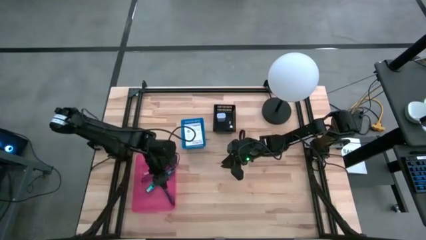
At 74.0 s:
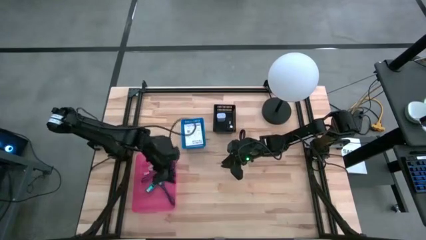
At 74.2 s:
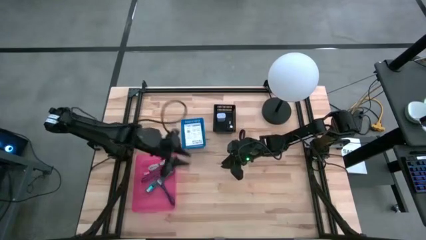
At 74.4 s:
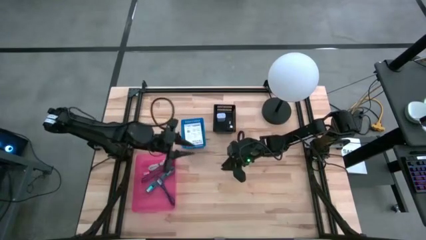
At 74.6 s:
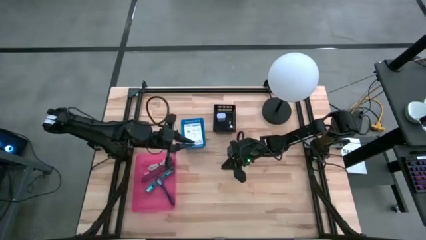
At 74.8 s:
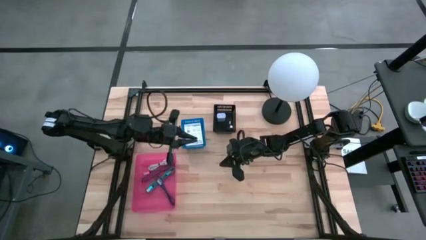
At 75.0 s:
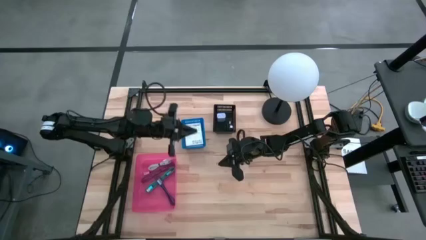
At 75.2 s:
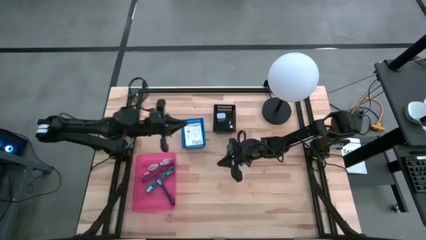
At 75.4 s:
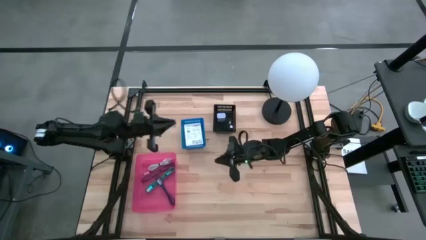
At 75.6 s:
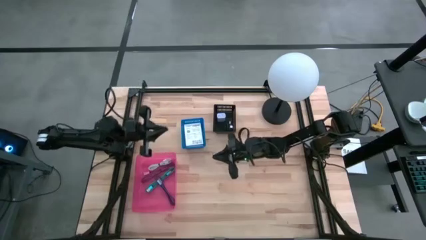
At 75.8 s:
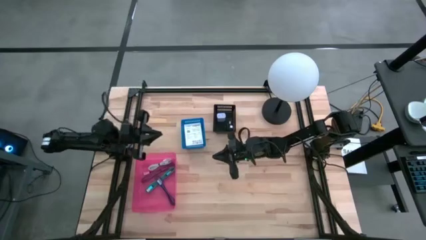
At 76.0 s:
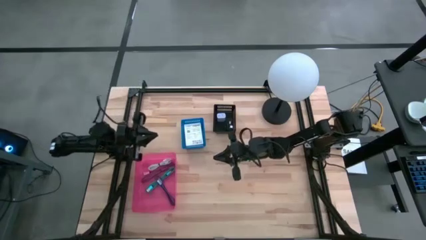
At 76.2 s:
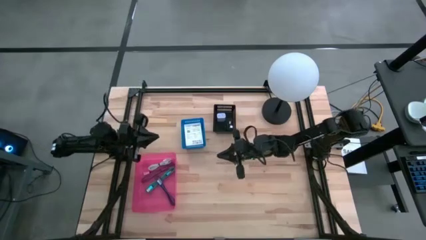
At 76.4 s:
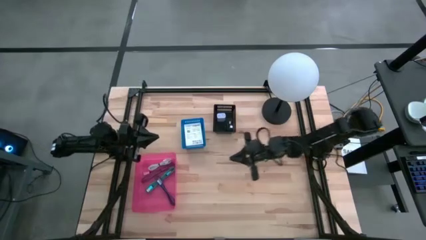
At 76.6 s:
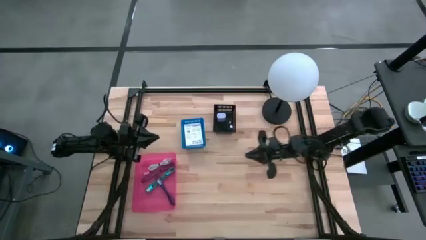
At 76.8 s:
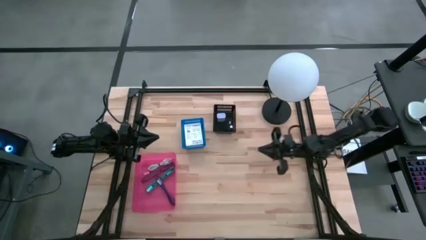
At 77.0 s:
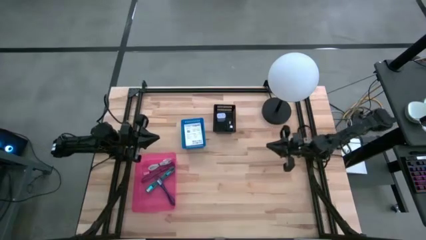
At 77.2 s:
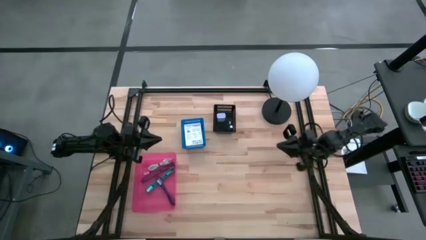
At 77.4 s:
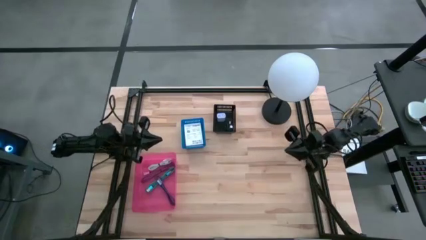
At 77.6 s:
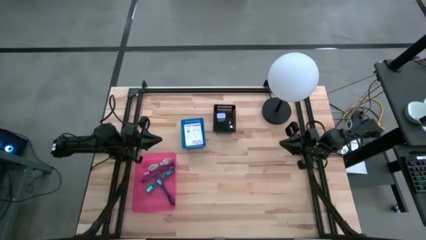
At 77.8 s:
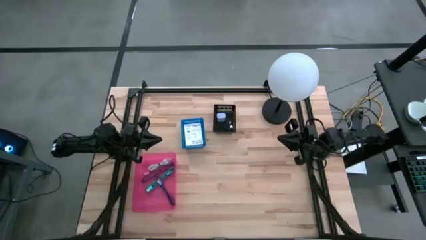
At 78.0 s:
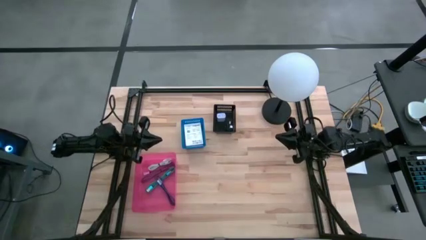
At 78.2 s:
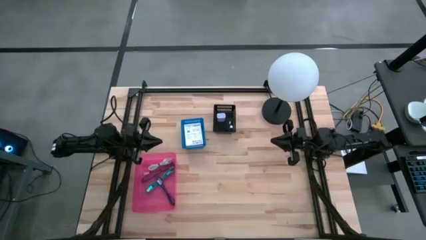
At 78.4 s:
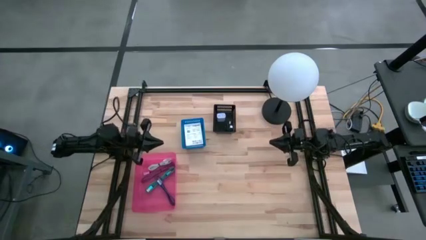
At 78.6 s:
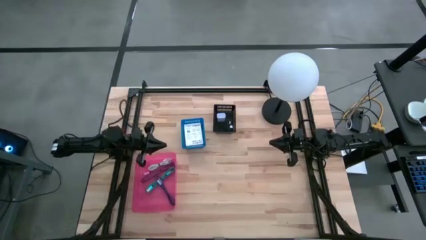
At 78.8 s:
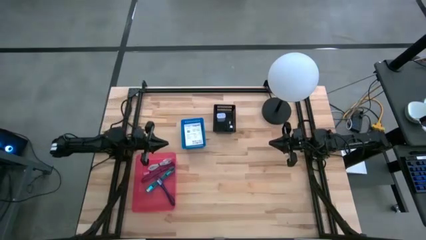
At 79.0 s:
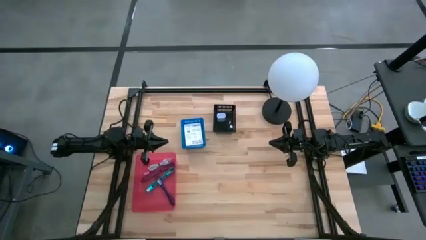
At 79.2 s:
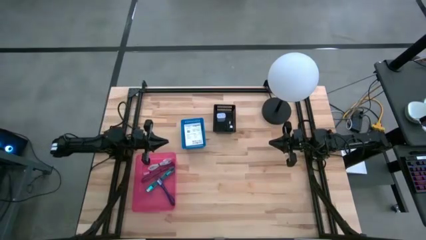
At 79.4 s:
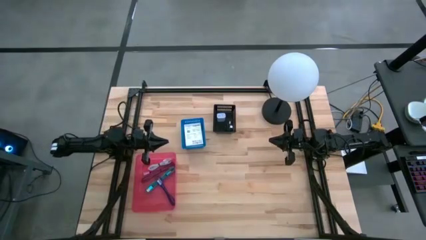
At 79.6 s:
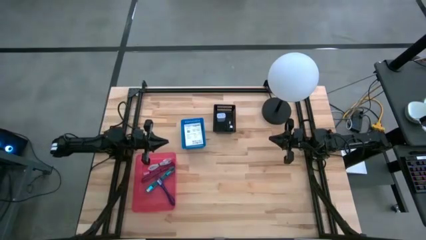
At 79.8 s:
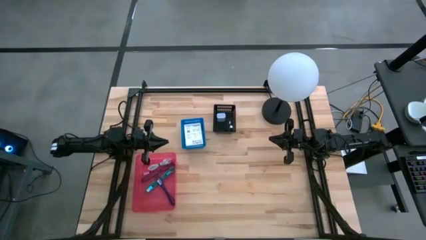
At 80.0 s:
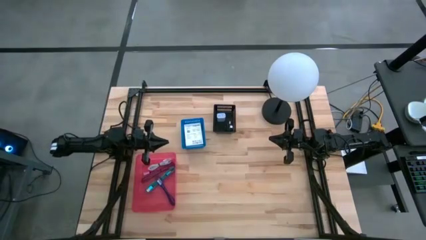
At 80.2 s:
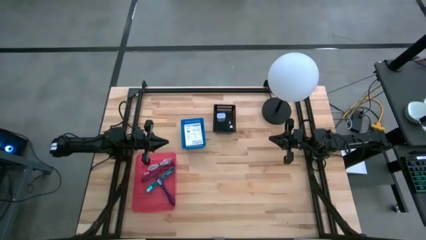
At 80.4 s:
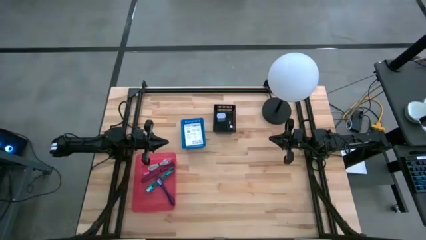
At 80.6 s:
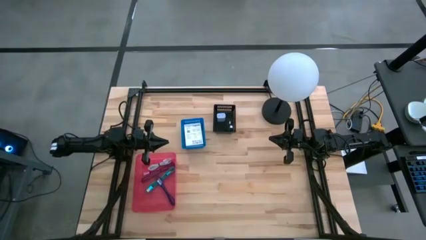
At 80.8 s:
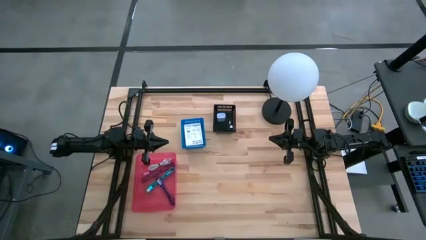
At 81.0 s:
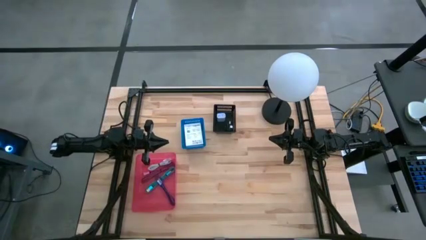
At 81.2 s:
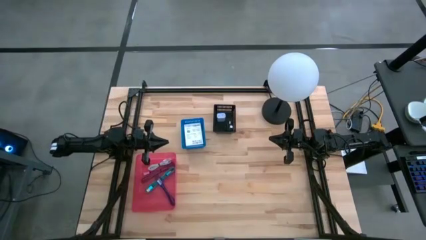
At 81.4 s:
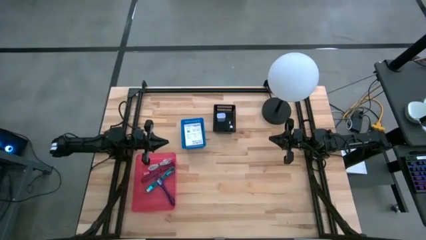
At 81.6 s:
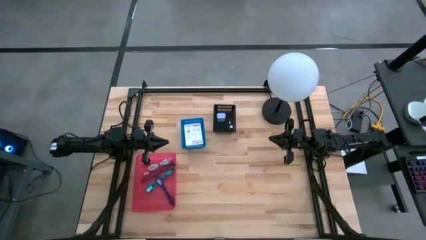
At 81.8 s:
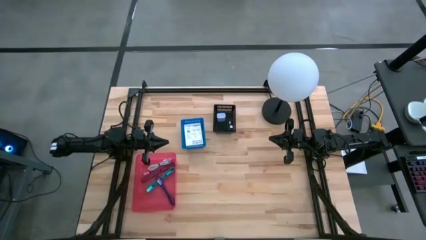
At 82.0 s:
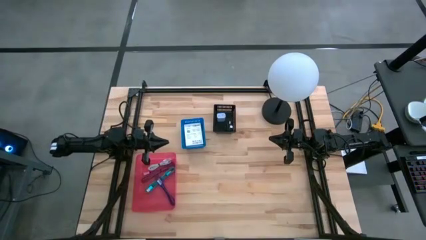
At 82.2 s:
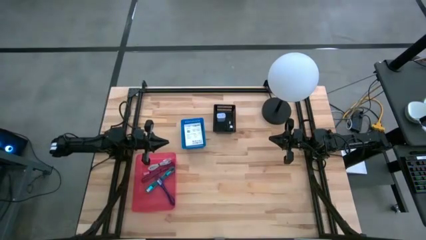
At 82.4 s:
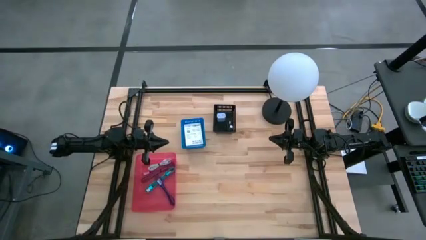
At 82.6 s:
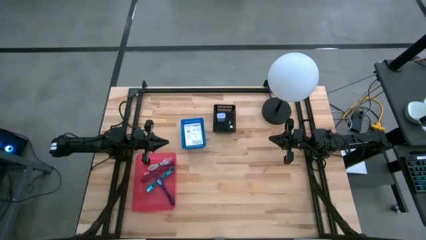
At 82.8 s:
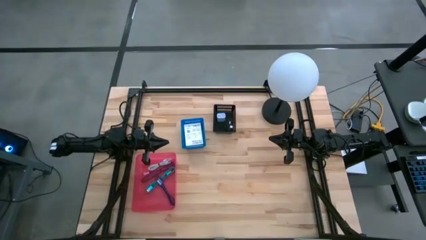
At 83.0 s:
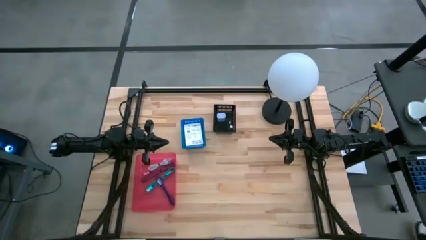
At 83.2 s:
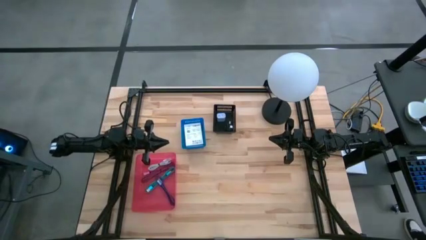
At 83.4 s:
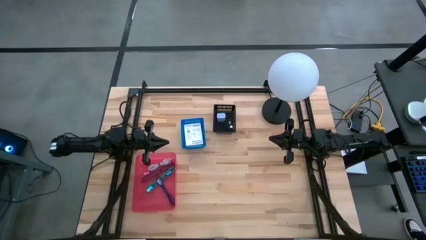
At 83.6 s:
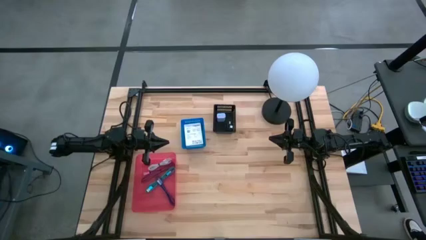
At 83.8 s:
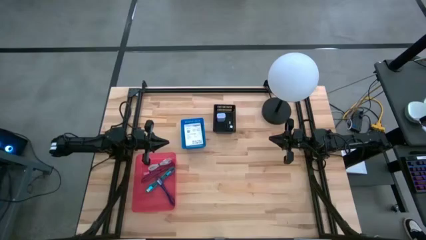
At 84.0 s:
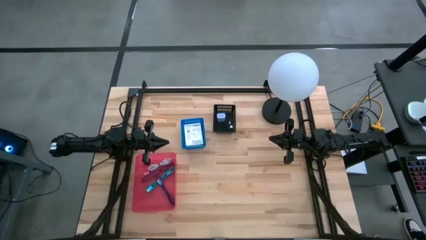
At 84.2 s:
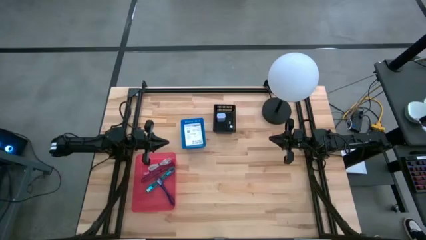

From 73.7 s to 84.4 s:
Task: Pick and place items into bin
Return to Home Position
